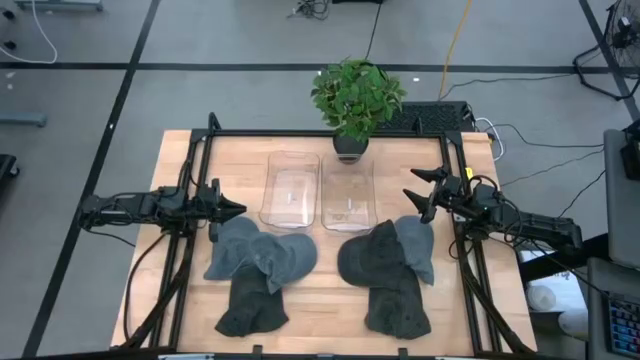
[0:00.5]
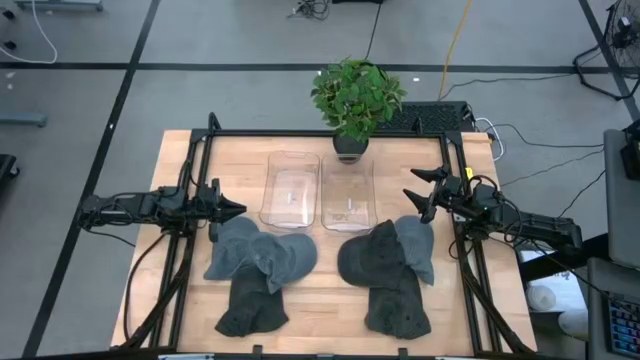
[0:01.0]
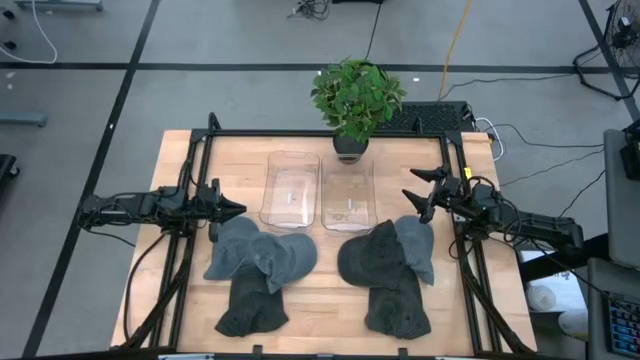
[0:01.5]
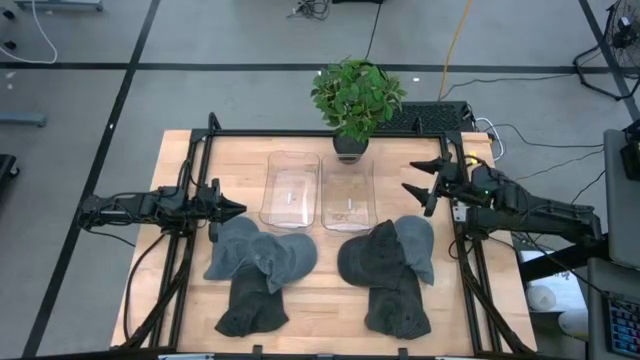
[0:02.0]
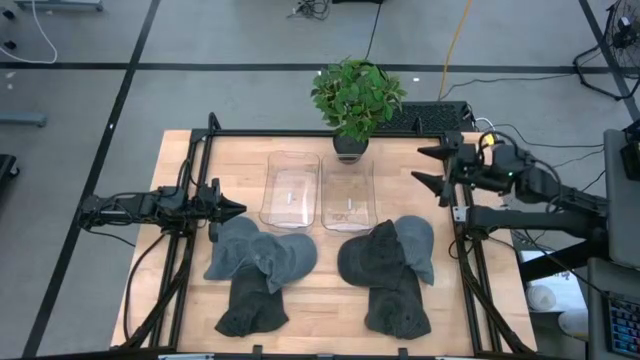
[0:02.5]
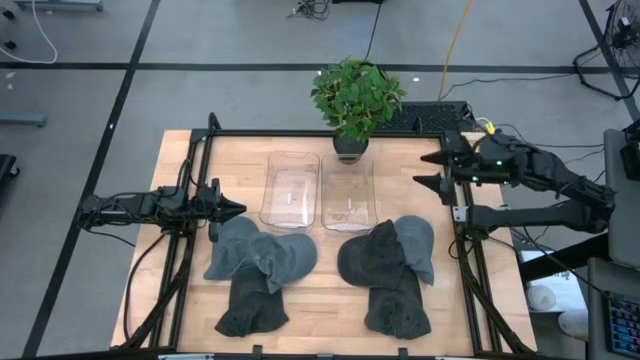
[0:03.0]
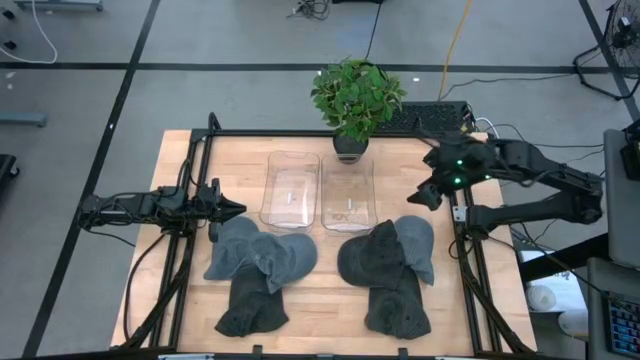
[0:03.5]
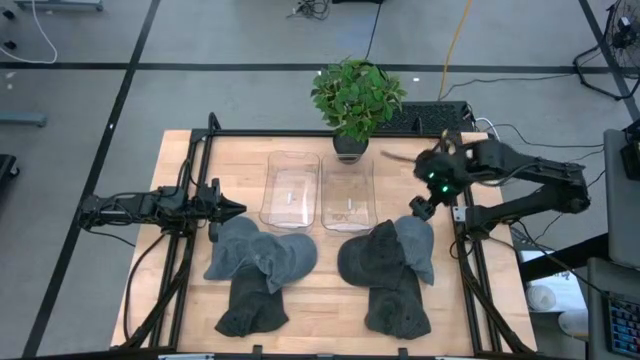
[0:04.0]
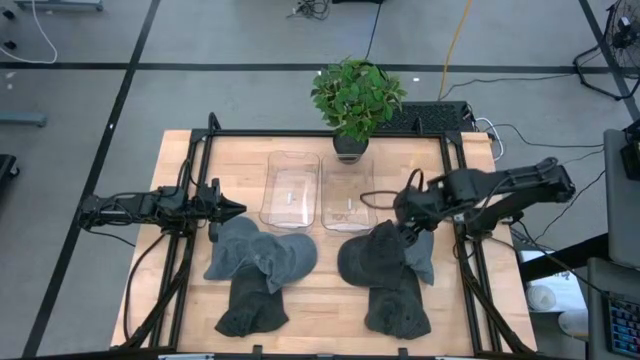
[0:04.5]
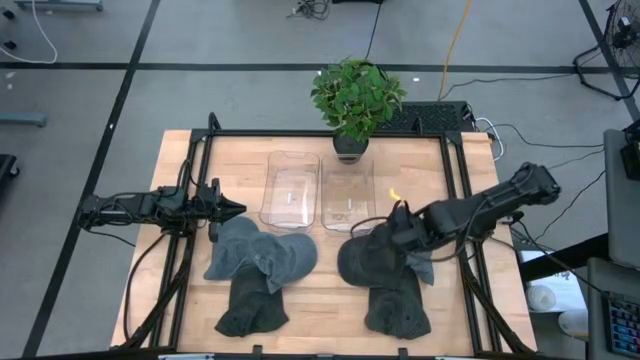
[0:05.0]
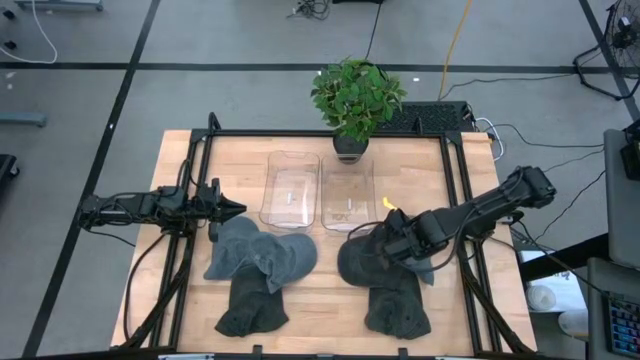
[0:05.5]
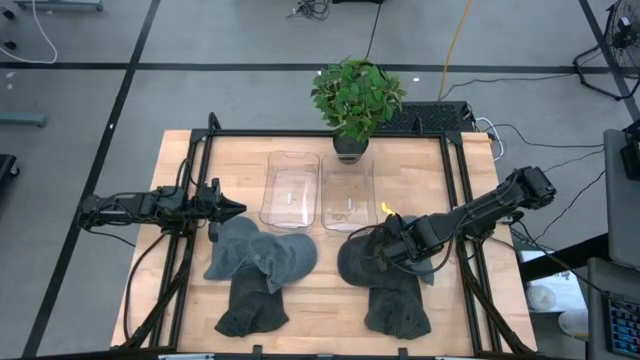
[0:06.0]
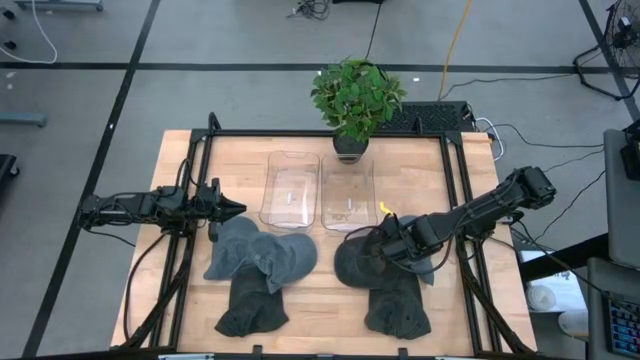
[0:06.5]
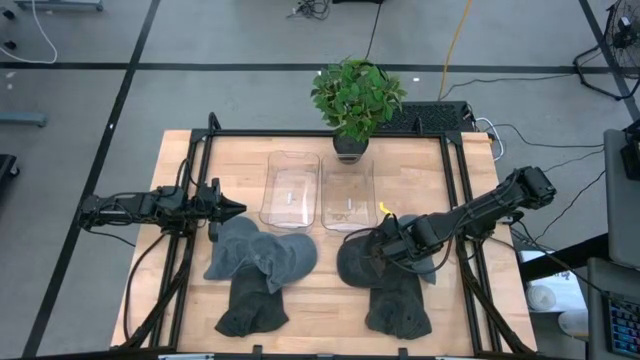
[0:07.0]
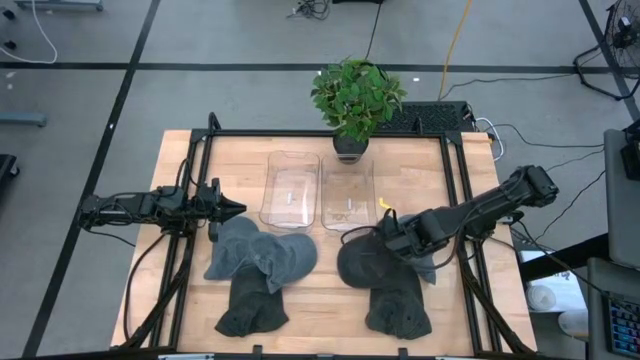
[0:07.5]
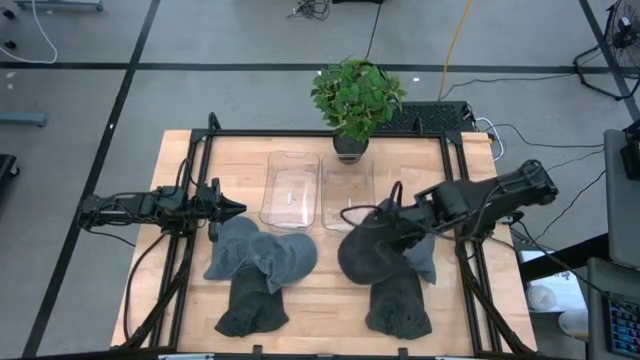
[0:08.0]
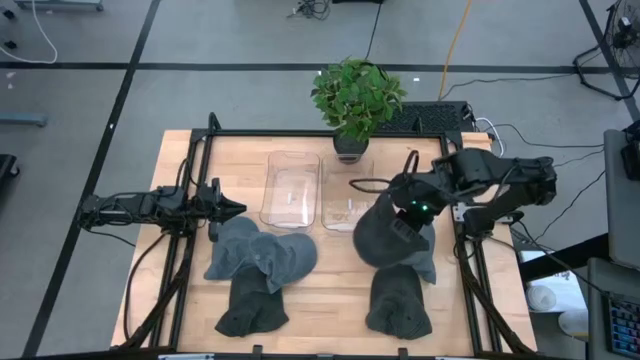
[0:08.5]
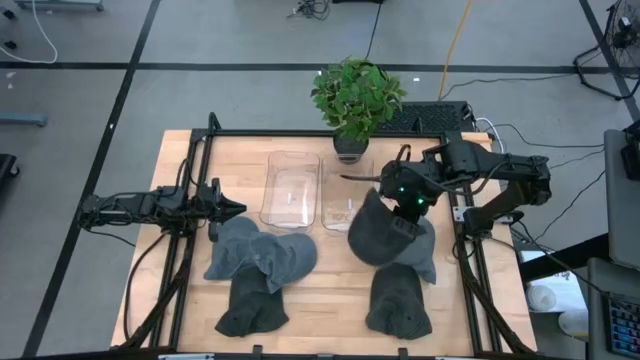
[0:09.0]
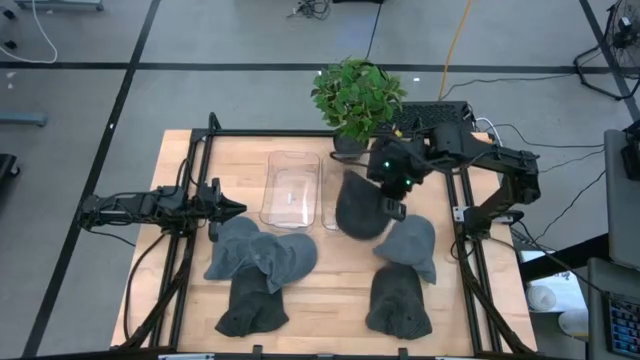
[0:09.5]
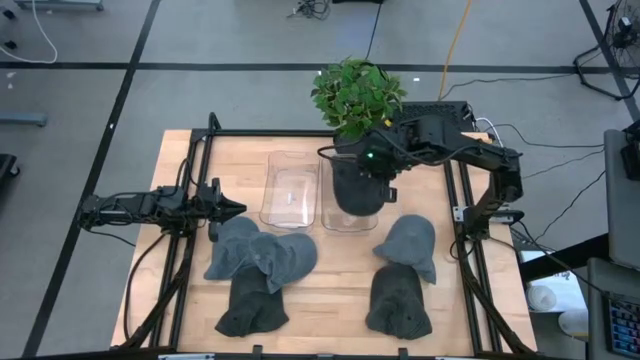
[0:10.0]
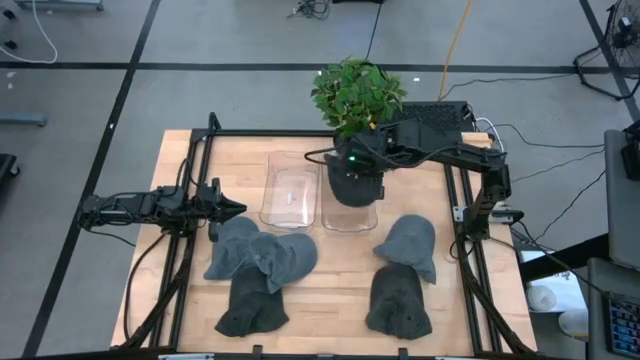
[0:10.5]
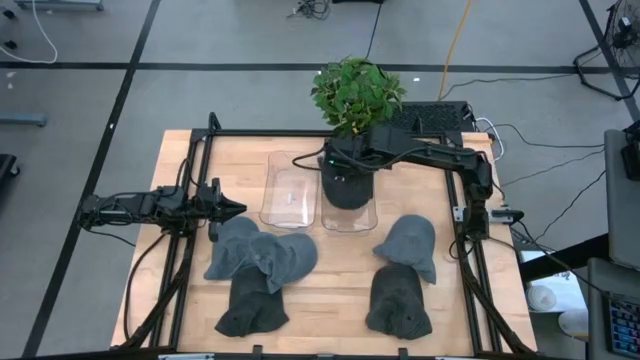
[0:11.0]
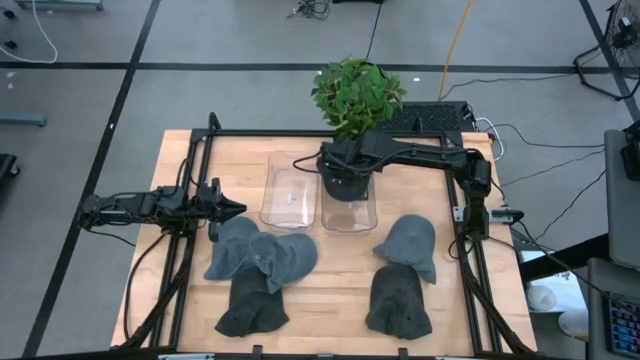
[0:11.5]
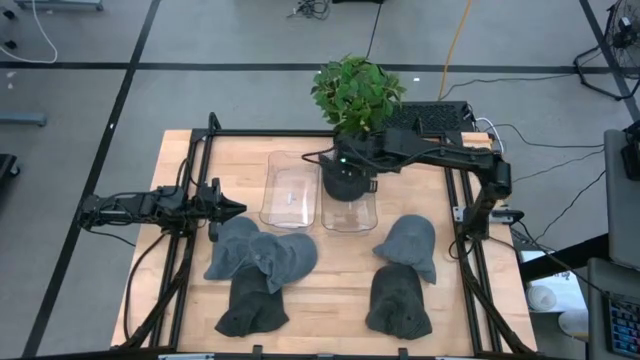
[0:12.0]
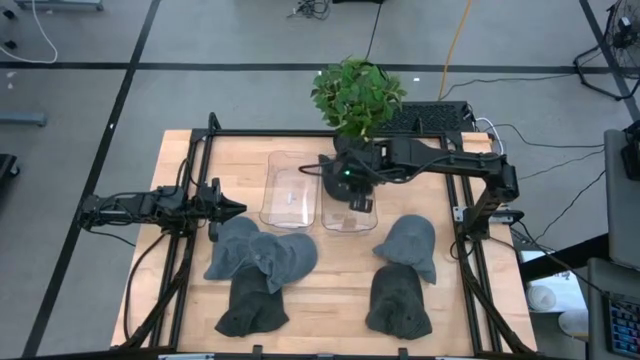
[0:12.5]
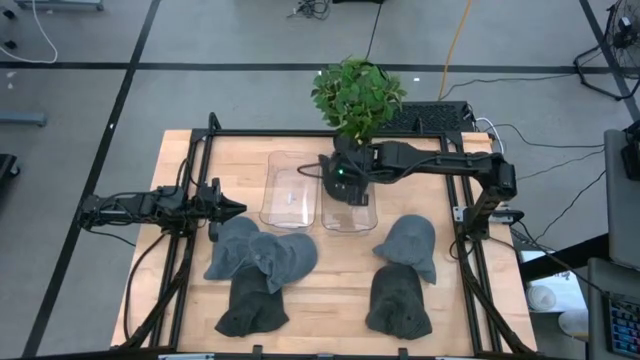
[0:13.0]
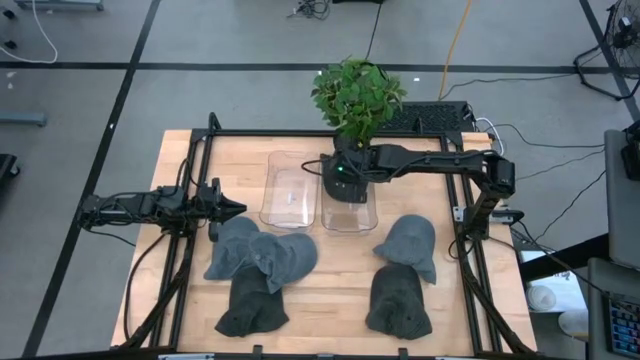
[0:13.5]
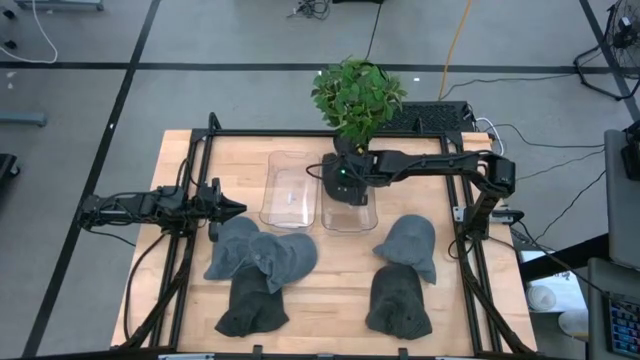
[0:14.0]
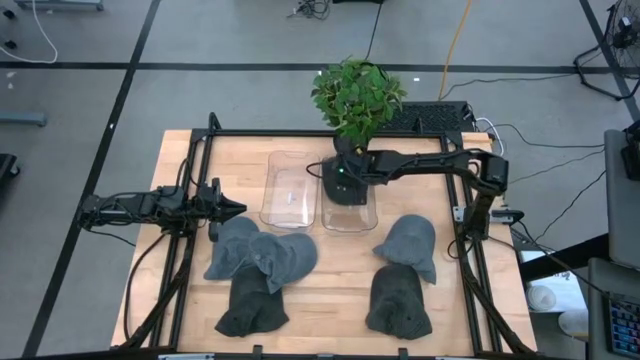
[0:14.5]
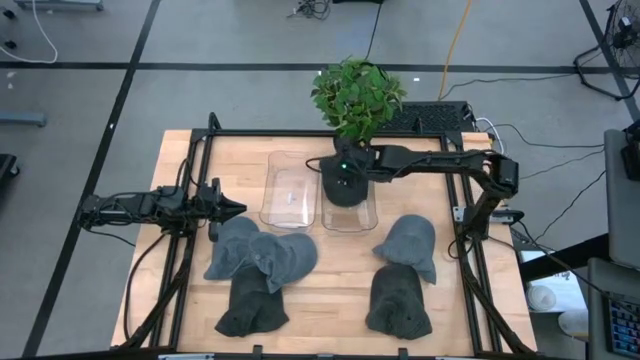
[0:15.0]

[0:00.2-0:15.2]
Task: Pick & Place hat
Put the top black cap into the right transparent bin

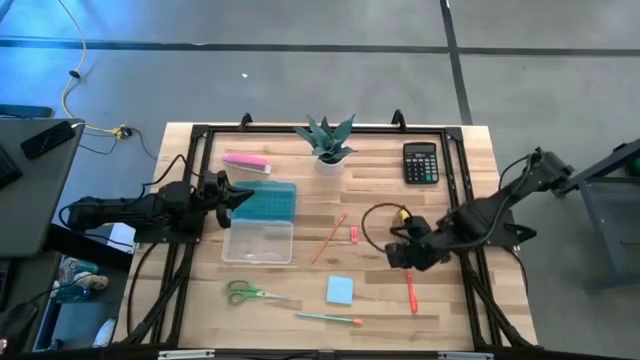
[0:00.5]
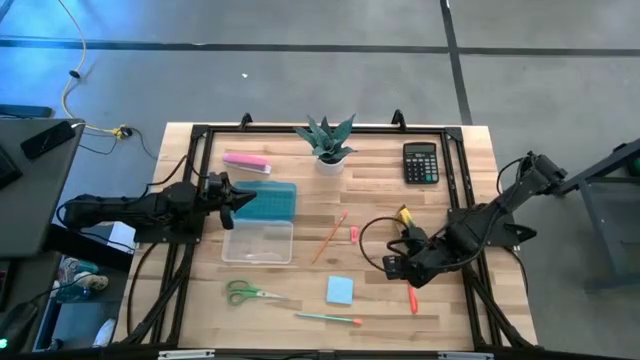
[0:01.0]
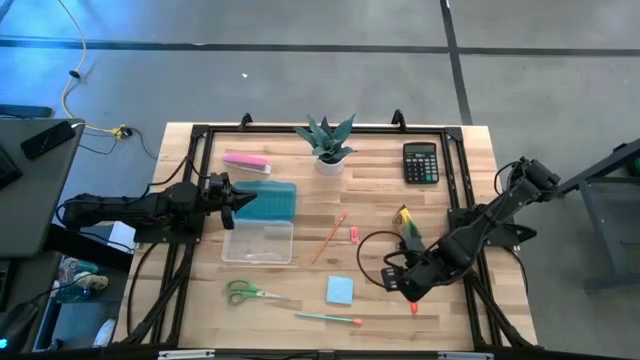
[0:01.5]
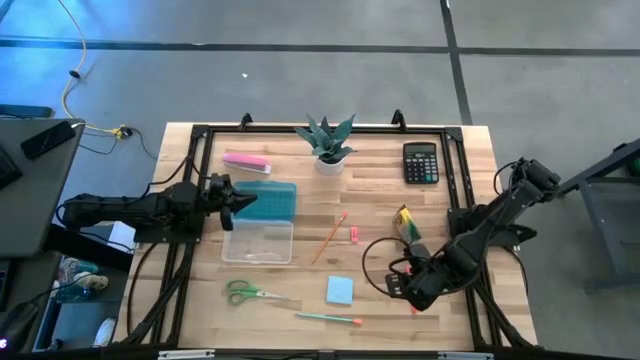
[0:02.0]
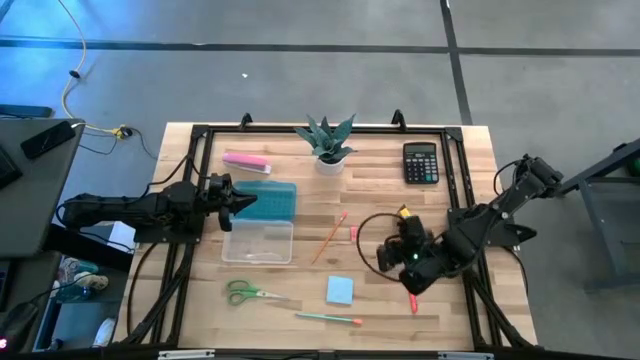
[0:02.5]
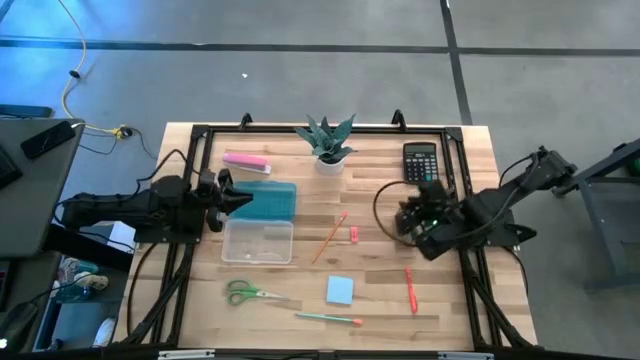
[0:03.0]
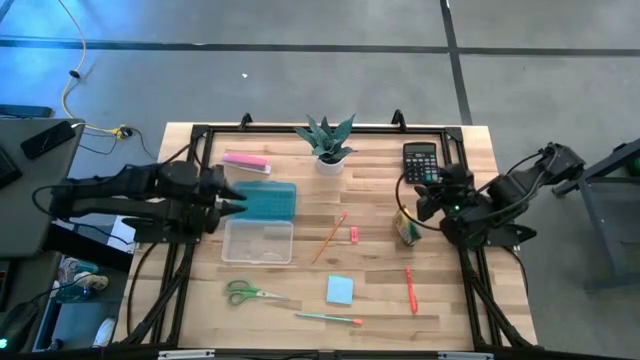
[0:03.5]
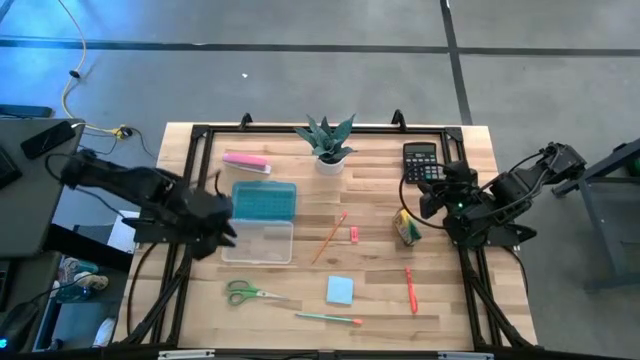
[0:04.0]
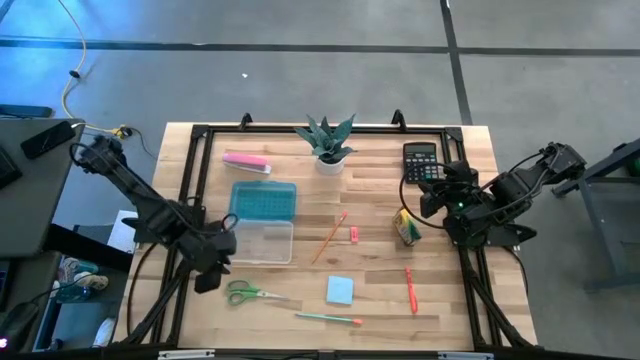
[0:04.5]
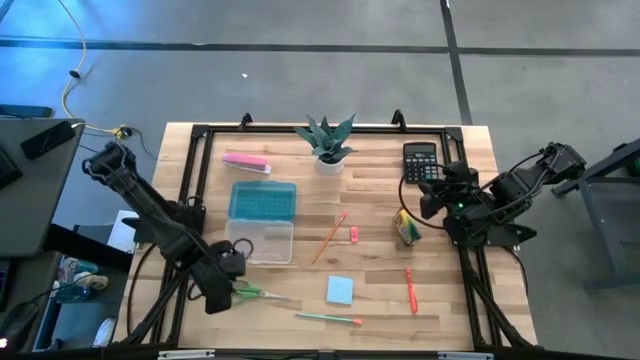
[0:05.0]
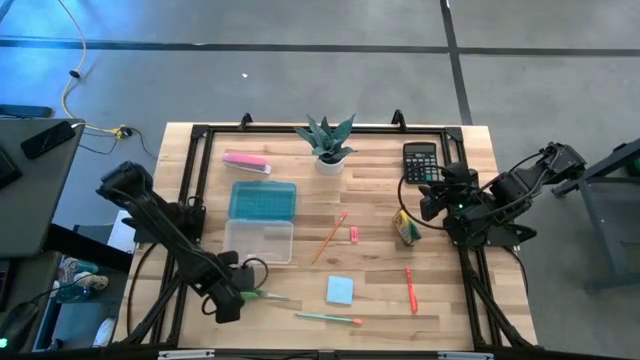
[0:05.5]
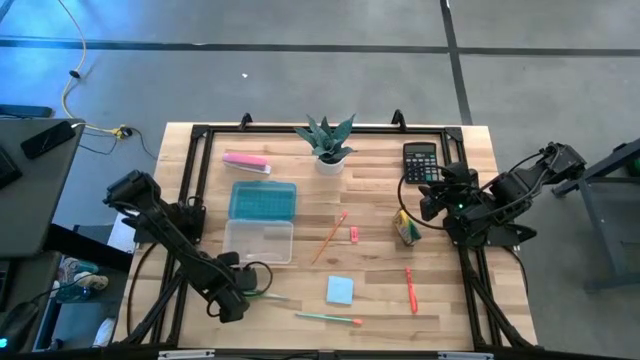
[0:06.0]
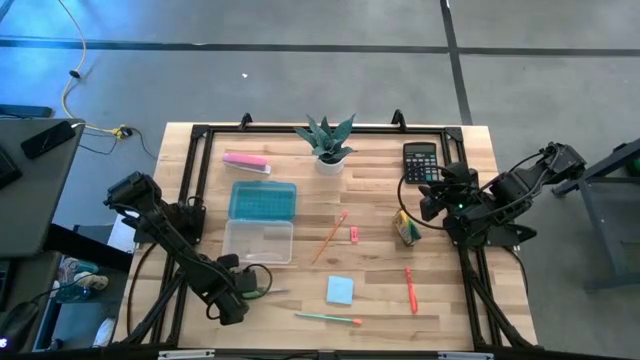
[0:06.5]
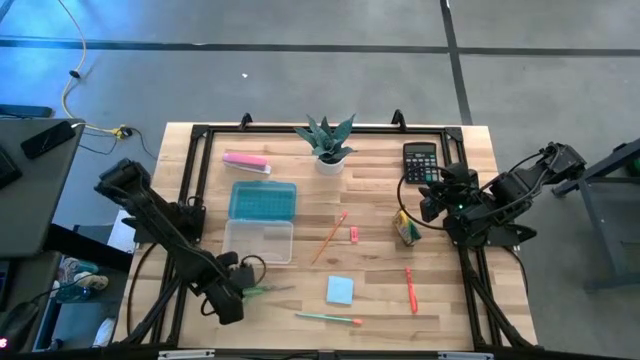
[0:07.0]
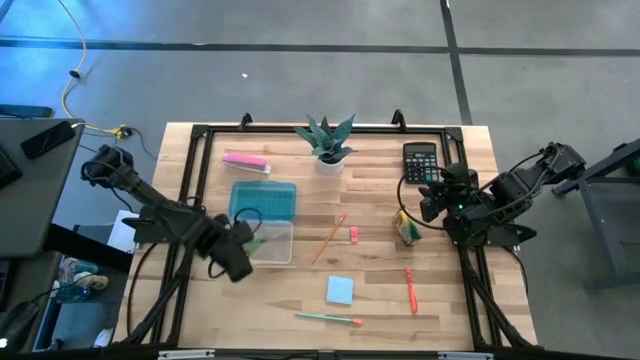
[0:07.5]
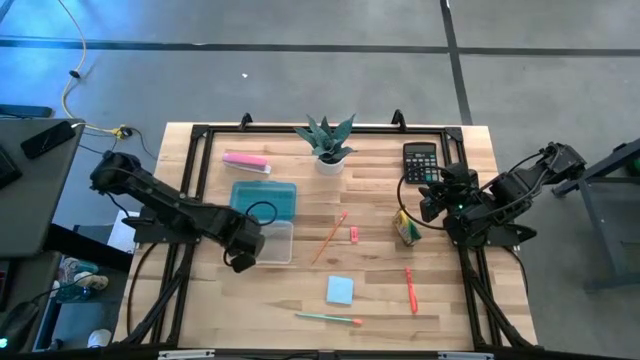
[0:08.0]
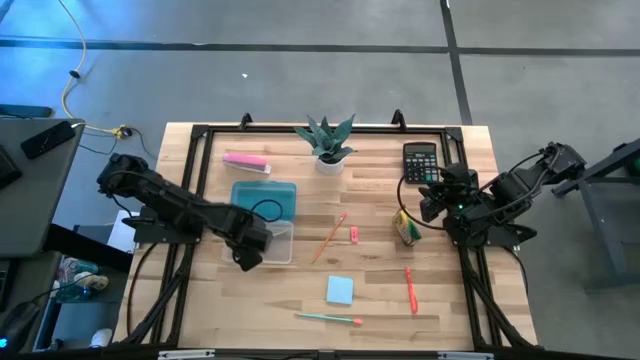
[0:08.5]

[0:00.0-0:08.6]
Task: Pack school essentials
Put the green scissors into the blue supply box
